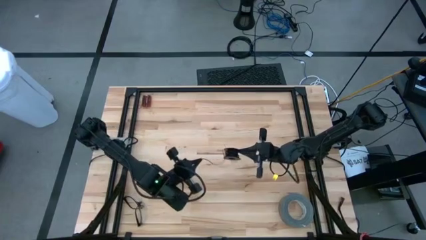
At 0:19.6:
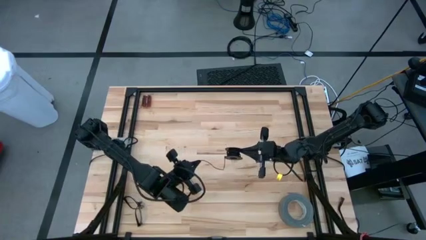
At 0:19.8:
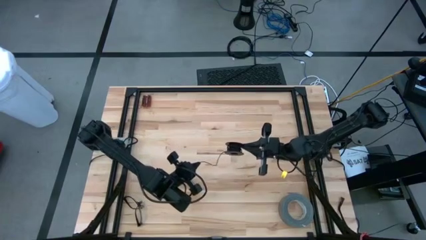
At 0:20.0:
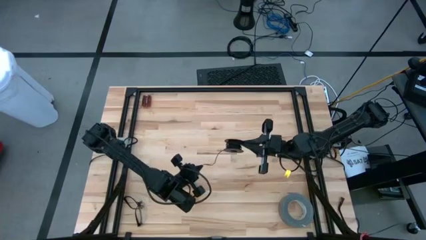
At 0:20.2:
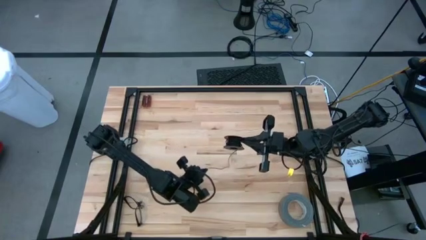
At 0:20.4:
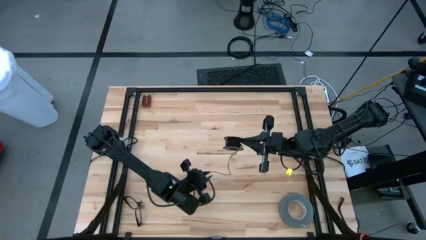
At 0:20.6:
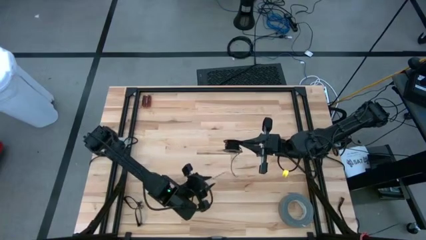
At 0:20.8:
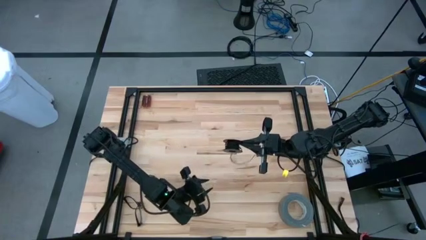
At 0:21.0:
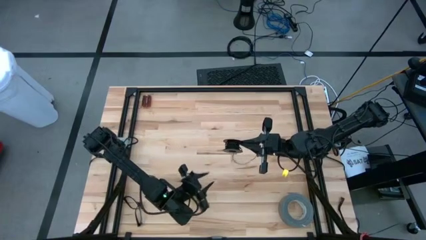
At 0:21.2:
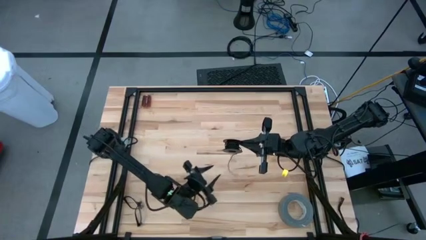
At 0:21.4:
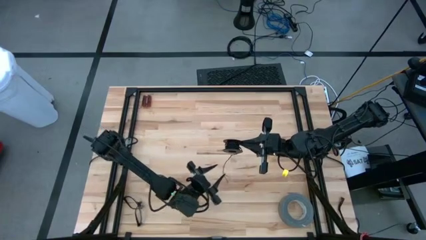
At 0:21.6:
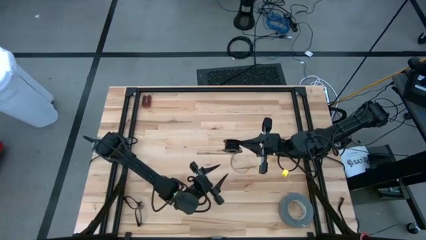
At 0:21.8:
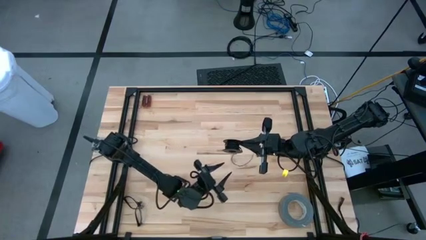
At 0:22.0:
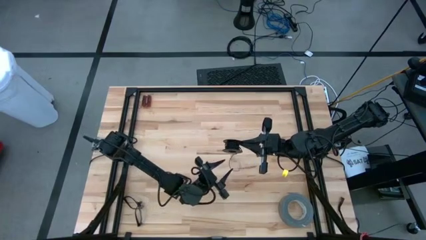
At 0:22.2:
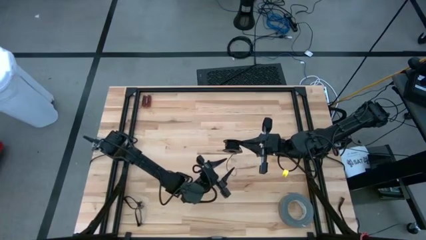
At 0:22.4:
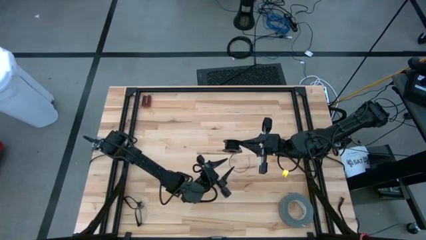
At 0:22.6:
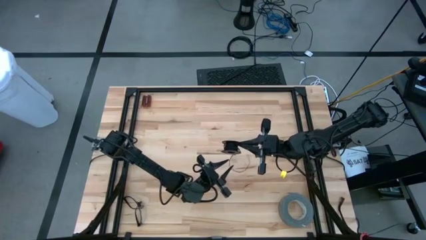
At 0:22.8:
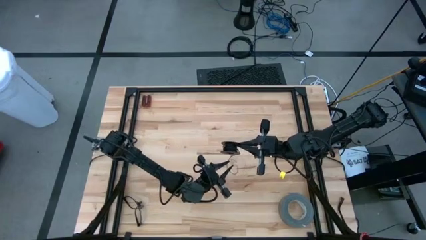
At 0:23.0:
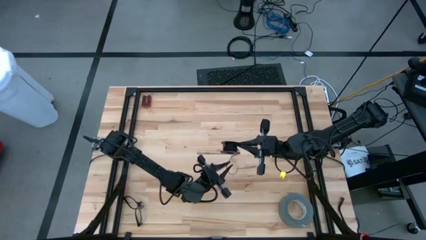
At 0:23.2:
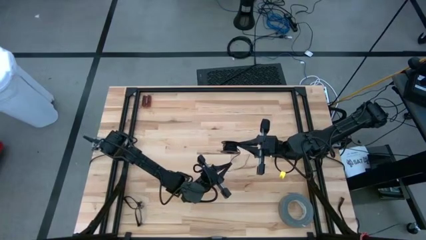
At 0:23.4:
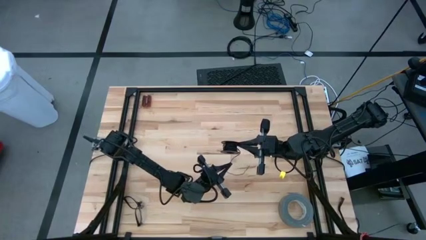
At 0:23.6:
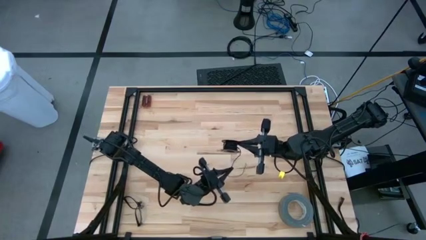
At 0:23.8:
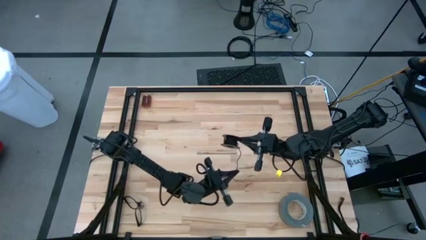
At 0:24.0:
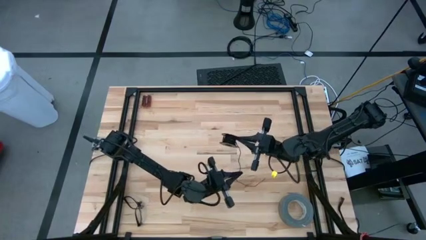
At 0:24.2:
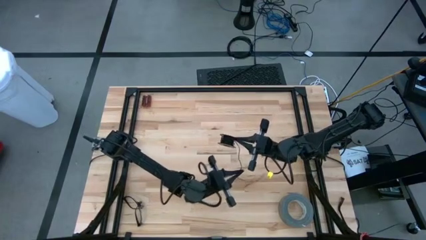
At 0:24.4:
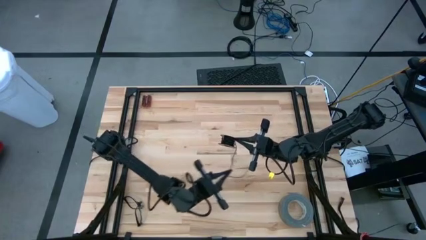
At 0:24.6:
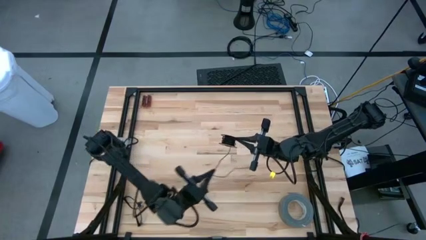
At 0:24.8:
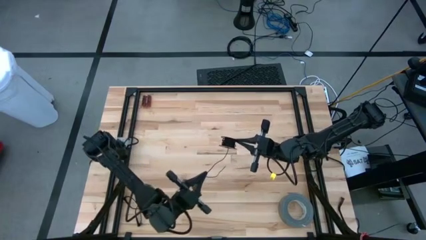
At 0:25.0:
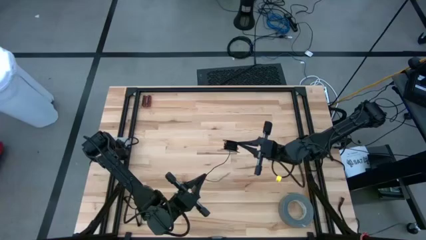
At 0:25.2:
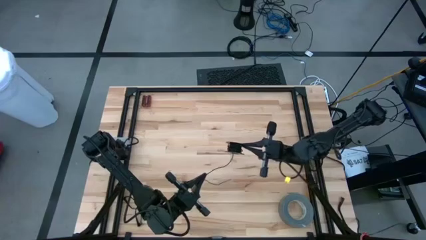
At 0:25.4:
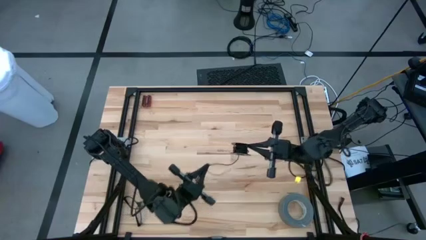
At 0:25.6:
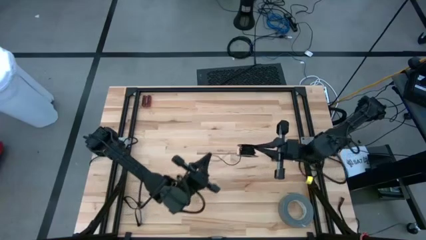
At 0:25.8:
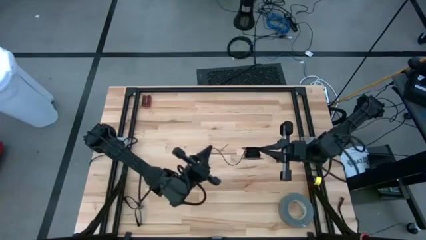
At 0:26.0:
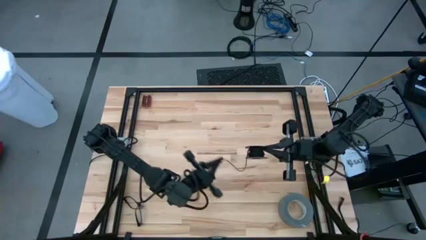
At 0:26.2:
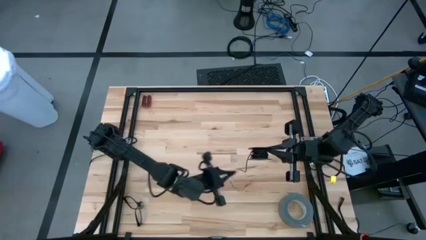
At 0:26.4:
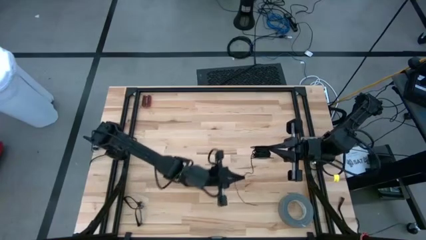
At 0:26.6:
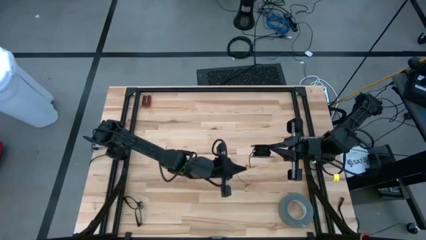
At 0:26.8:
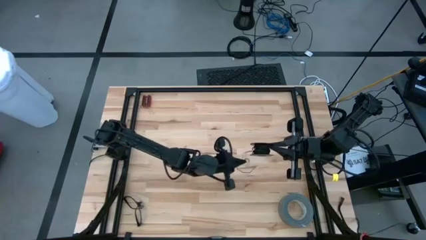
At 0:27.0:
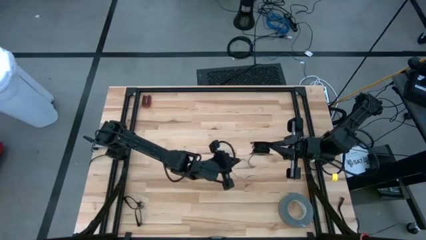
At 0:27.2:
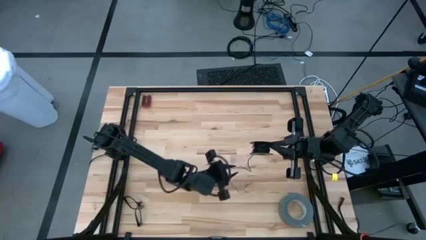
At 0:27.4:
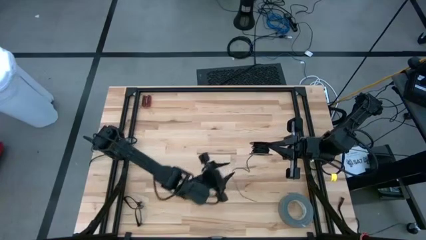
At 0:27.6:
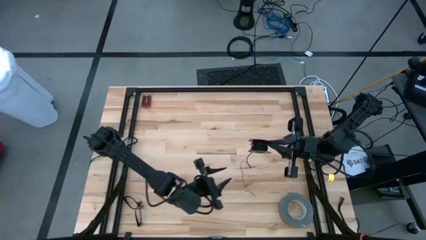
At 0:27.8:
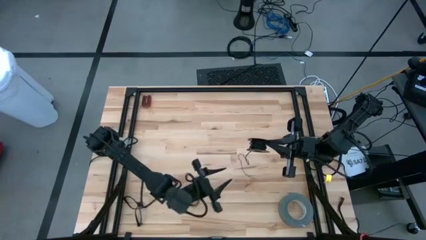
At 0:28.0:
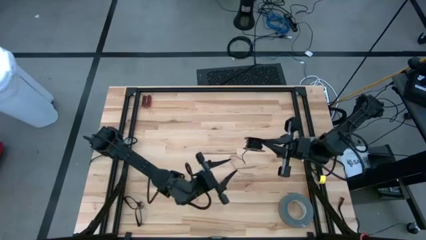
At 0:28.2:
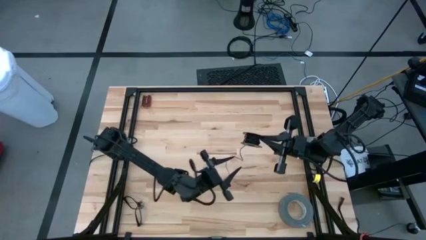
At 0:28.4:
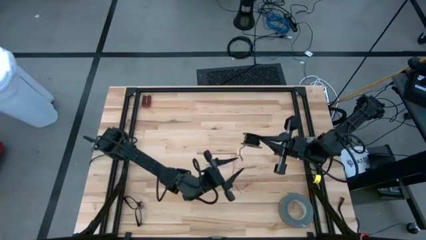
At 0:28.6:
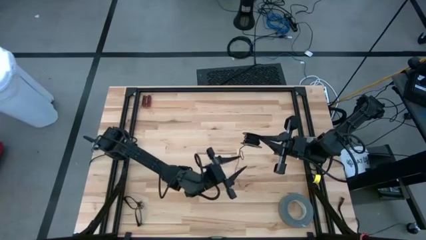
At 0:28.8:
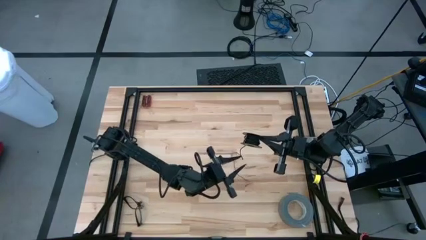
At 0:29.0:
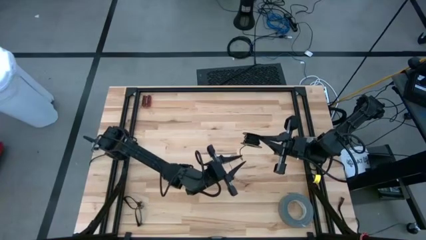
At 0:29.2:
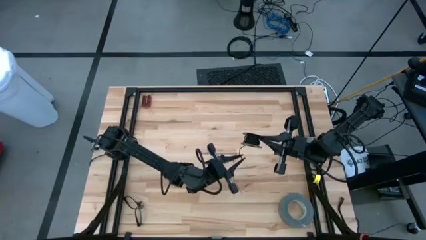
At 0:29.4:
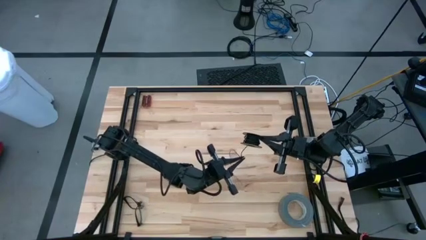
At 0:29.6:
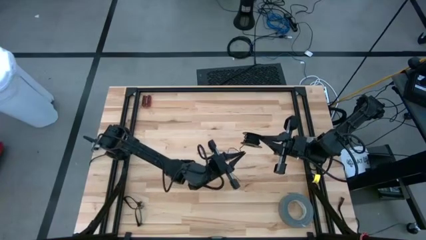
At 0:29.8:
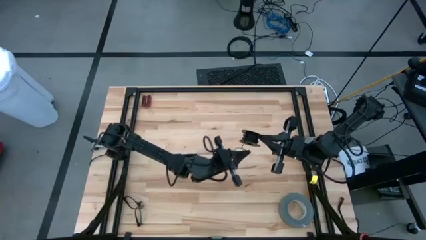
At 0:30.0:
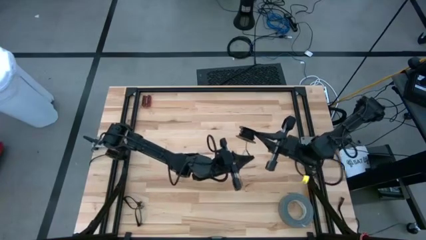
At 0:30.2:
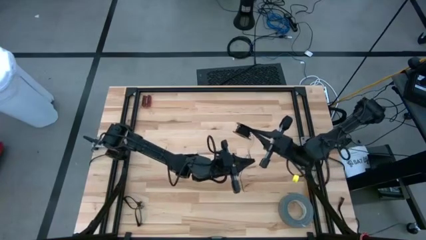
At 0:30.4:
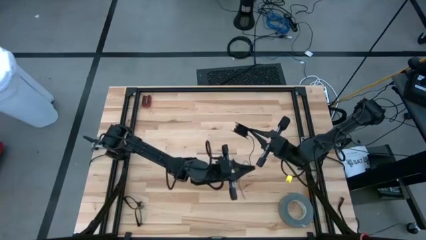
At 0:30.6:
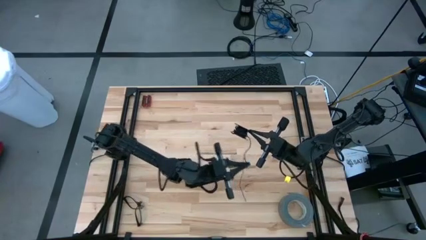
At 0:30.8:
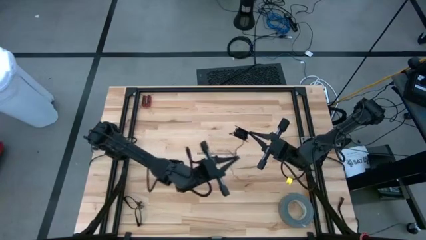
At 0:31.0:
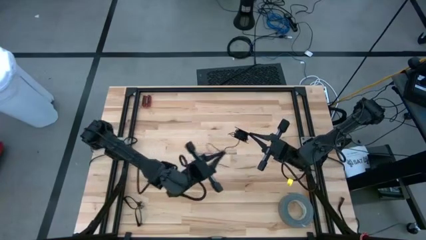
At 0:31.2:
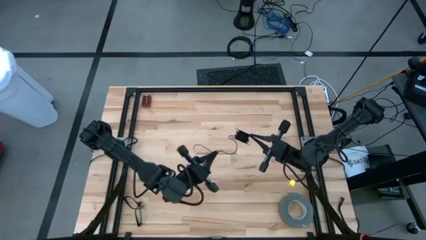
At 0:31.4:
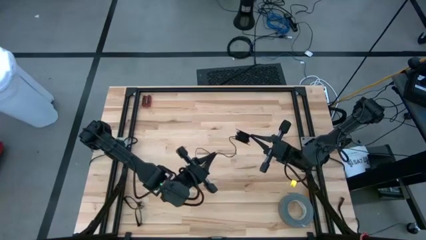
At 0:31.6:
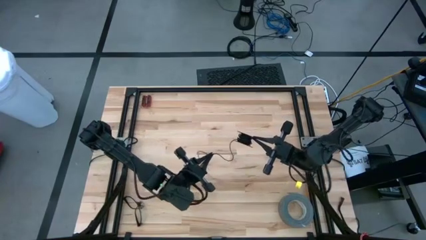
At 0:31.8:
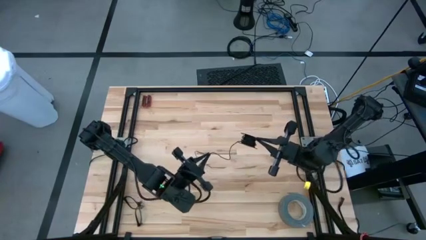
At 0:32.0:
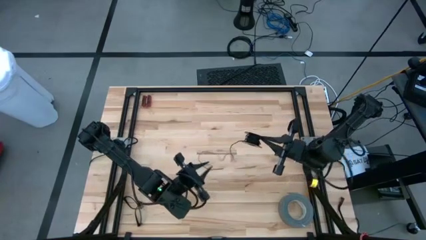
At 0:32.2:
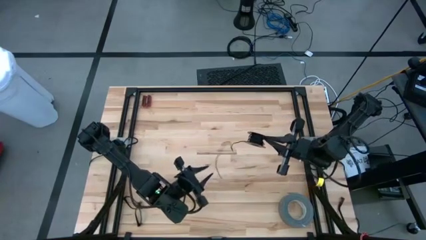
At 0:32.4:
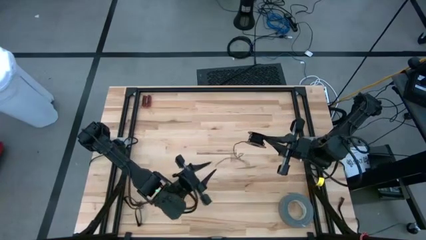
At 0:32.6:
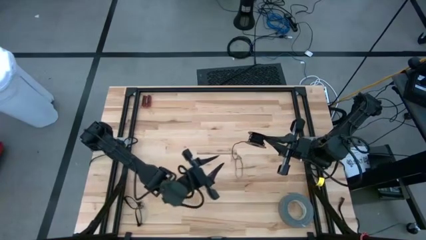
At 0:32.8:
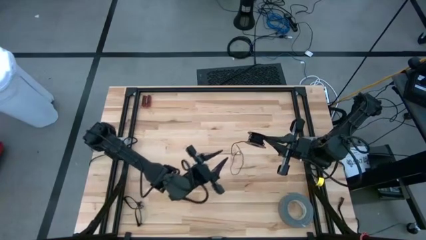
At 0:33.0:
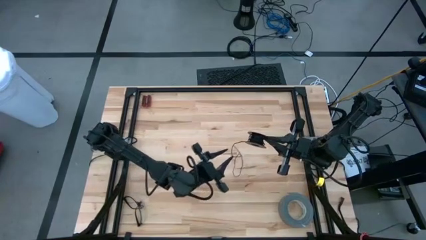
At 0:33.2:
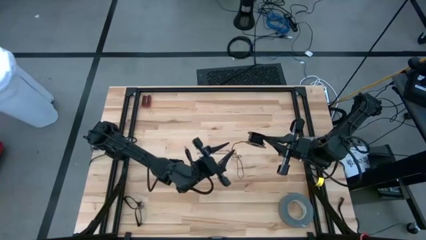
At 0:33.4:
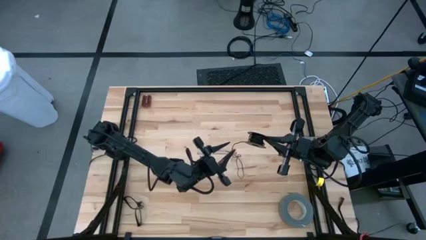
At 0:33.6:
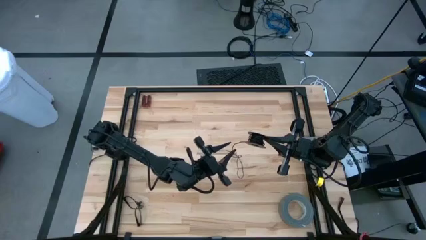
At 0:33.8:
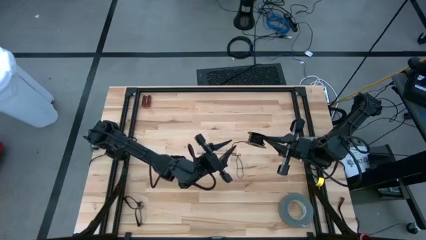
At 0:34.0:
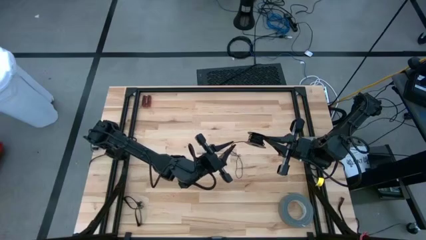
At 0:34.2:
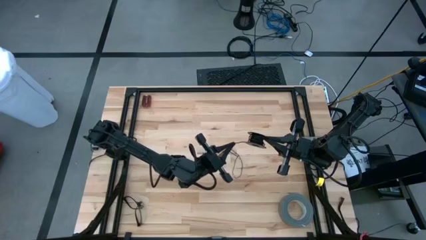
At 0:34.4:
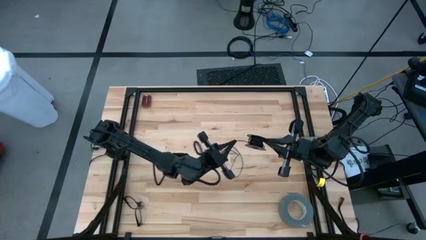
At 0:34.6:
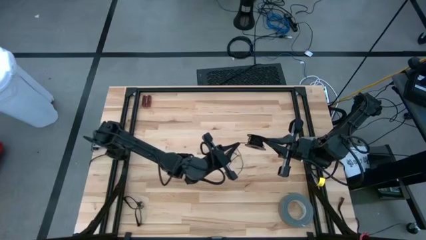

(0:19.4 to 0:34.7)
Task: Coil cords
Uncoil the black wire from the spool
